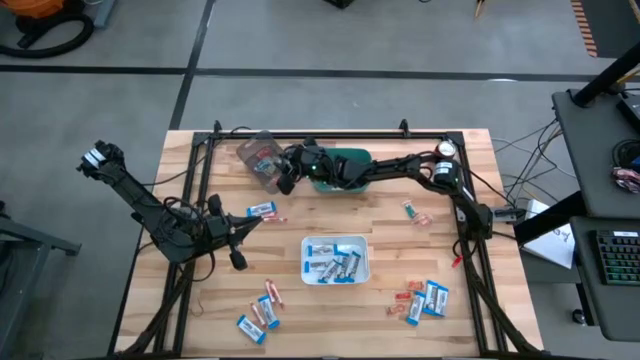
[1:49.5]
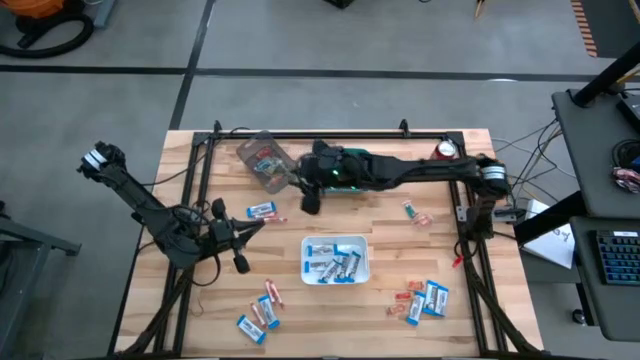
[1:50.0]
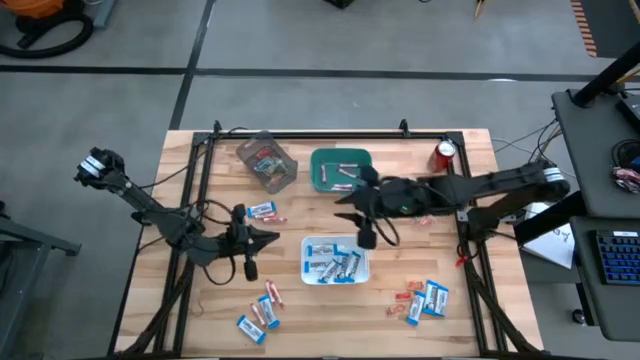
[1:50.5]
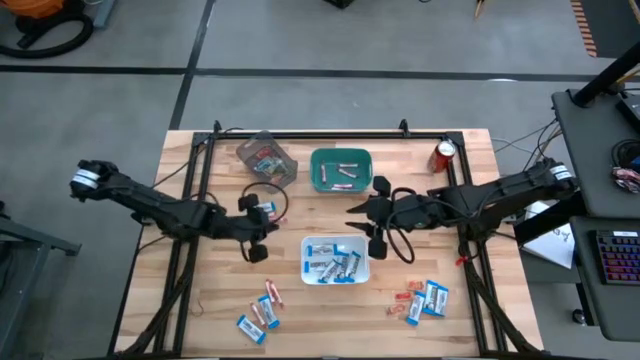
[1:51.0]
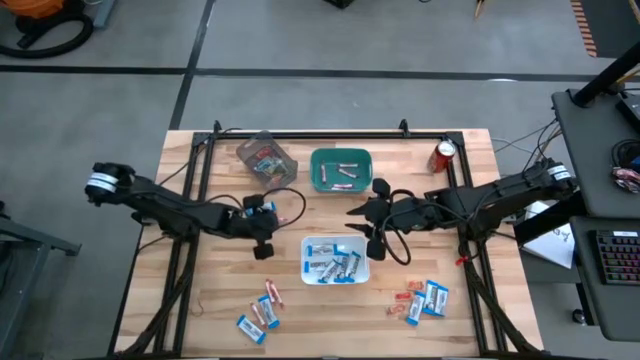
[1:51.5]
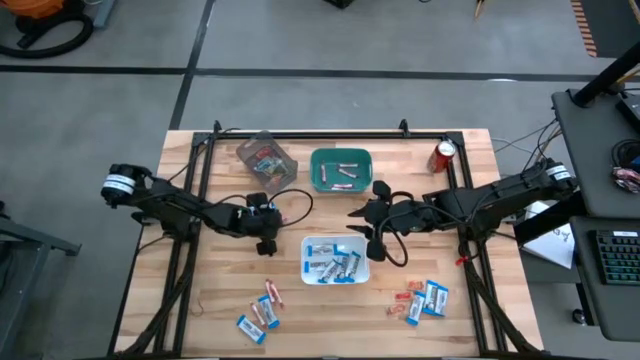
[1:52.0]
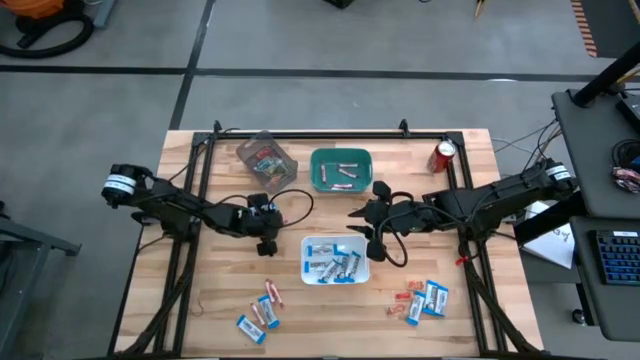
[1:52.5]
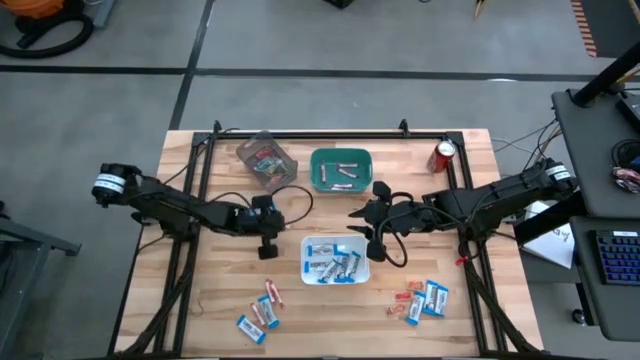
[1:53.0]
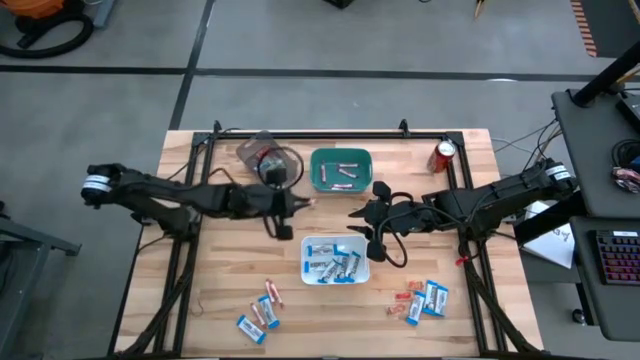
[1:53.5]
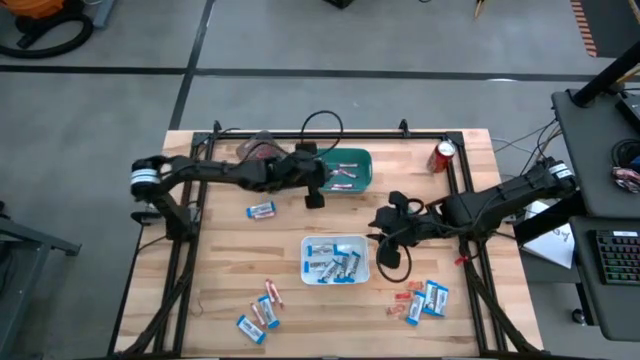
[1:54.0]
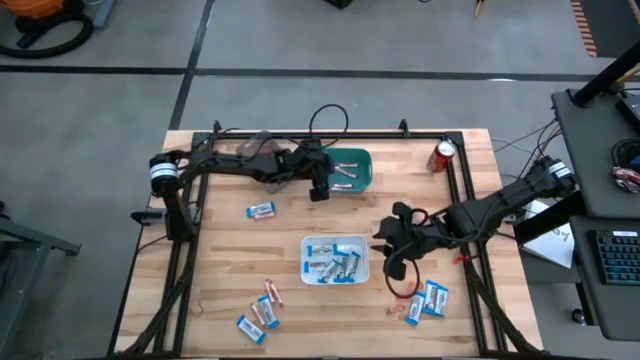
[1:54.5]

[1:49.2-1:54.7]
Task: Sort candy
Put the white candy into the green bin

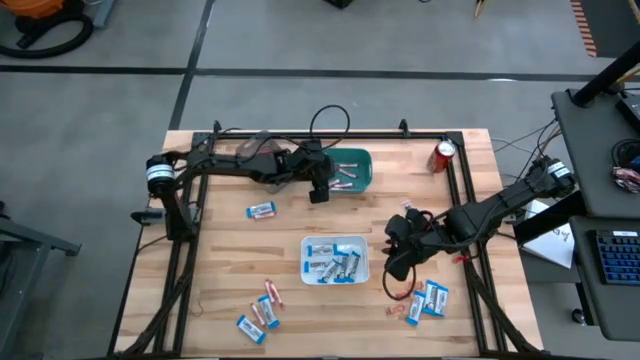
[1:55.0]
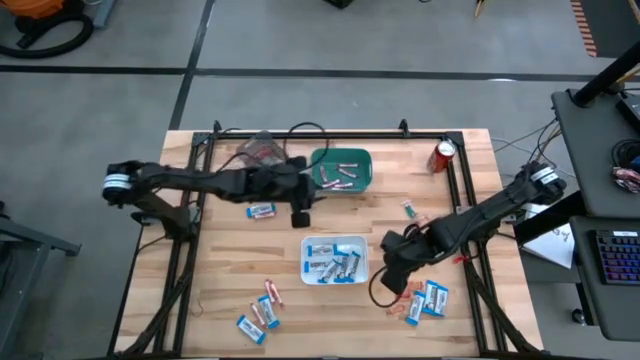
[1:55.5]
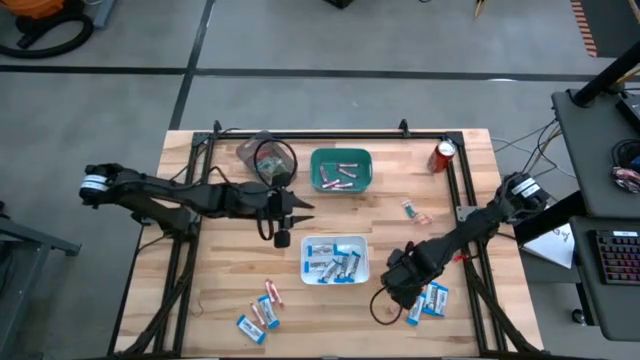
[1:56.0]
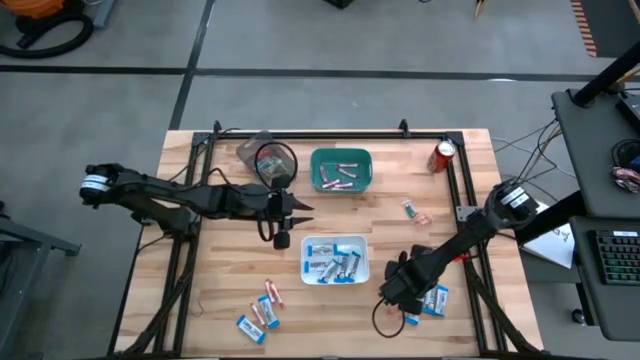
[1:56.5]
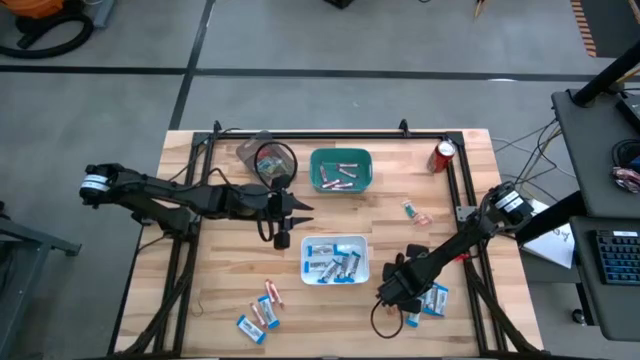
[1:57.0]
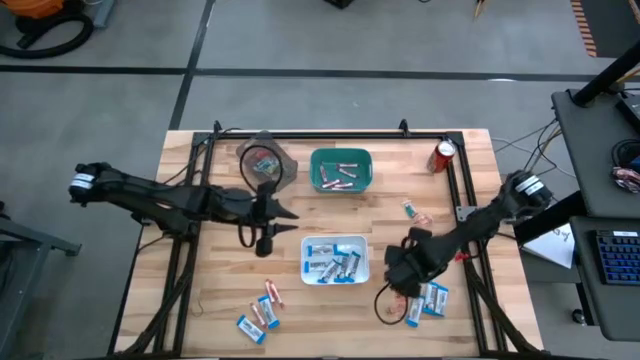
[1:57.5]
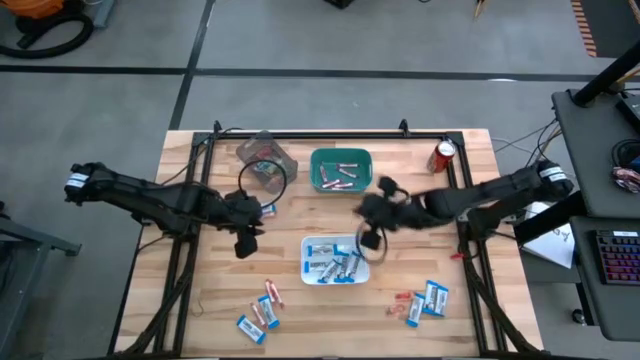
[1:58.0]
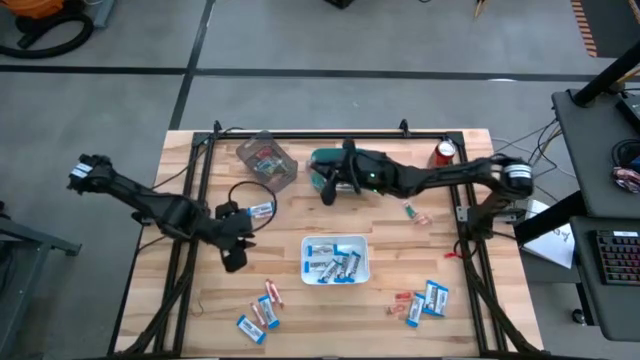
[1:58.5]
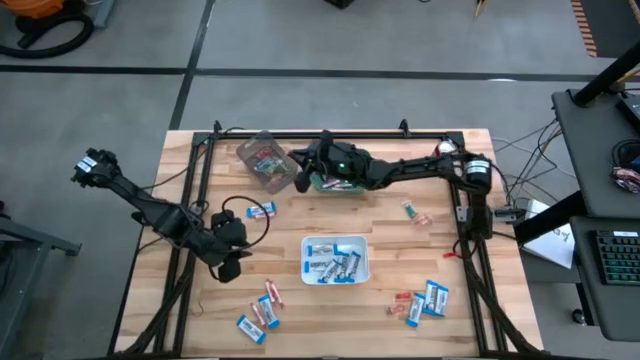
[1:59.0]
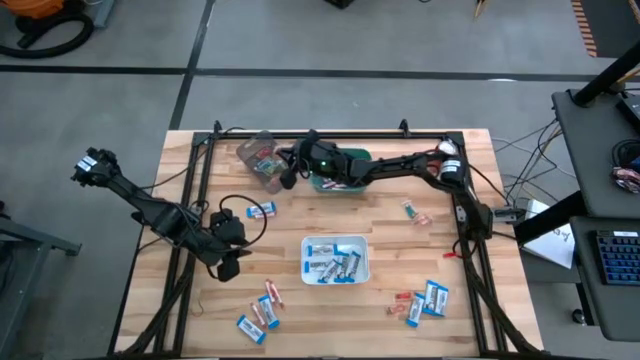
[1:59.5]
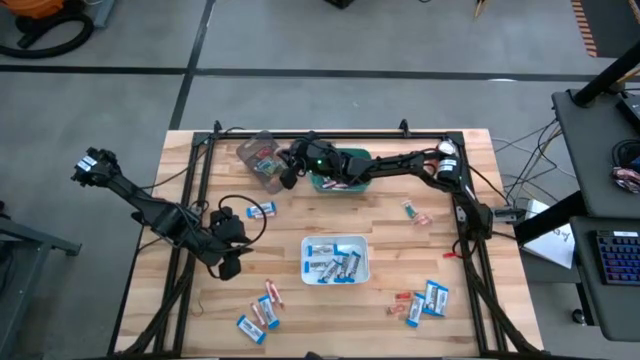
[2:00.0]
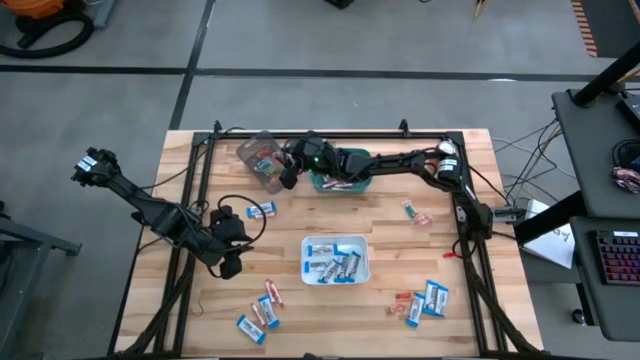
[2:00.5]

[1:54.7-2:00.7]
Put the orange gummy into the black bin

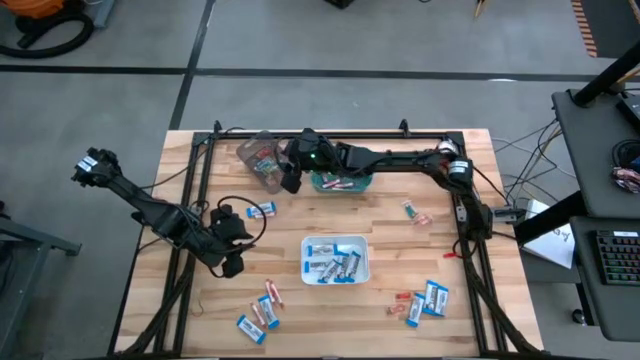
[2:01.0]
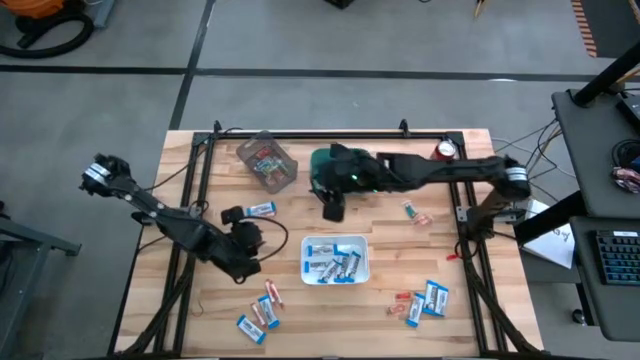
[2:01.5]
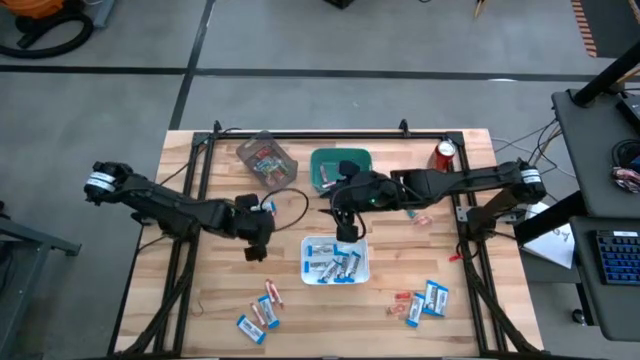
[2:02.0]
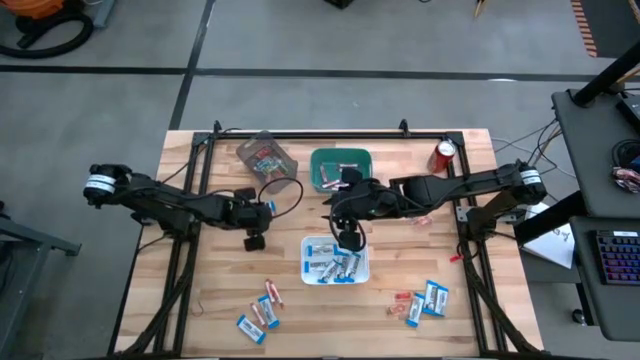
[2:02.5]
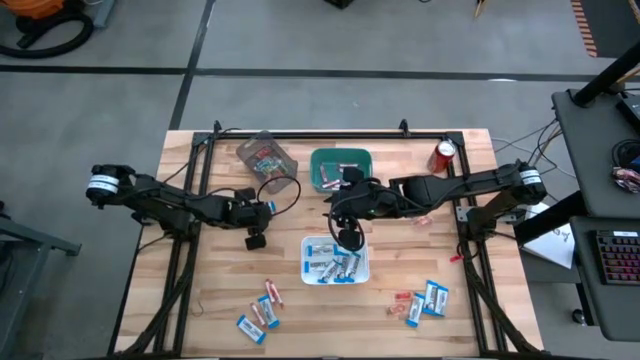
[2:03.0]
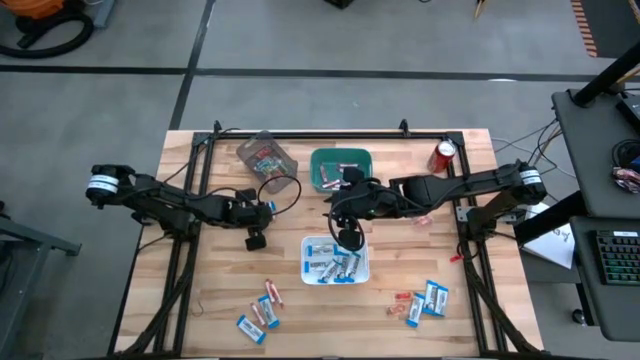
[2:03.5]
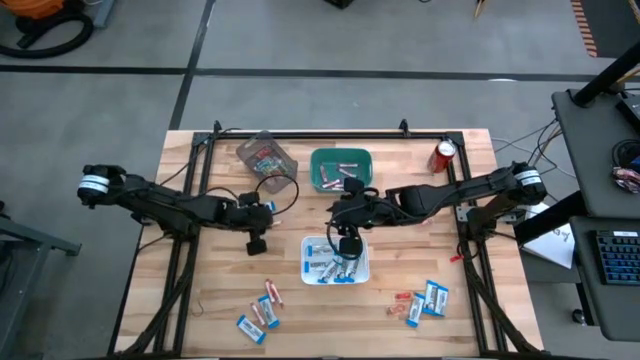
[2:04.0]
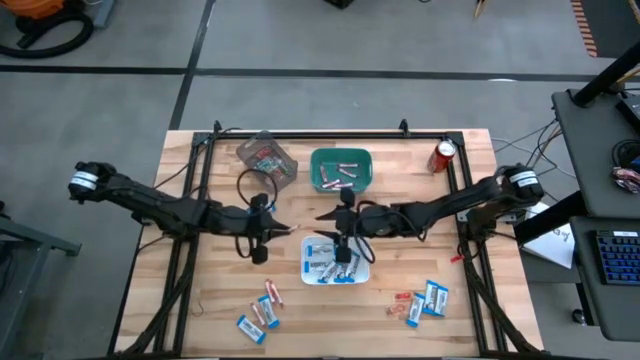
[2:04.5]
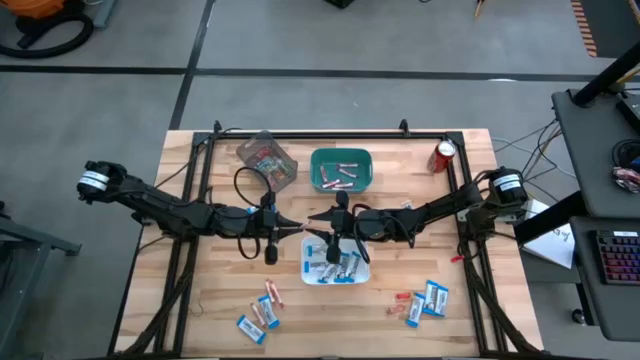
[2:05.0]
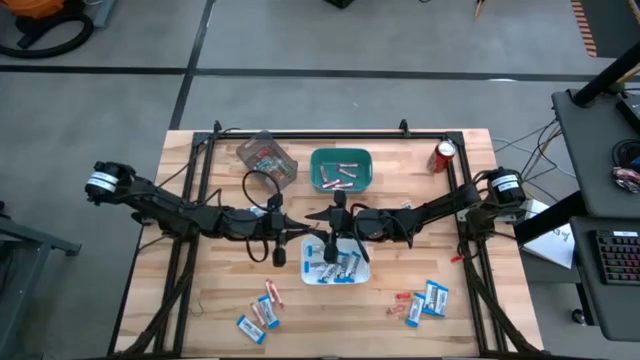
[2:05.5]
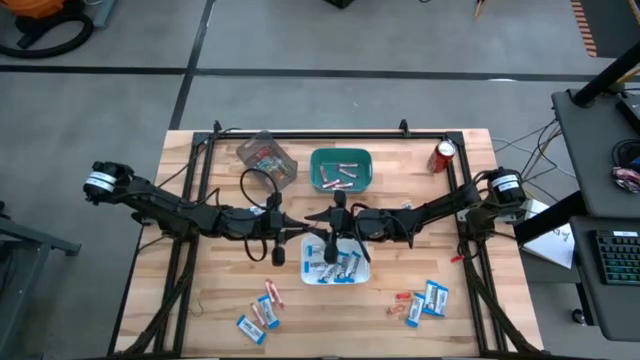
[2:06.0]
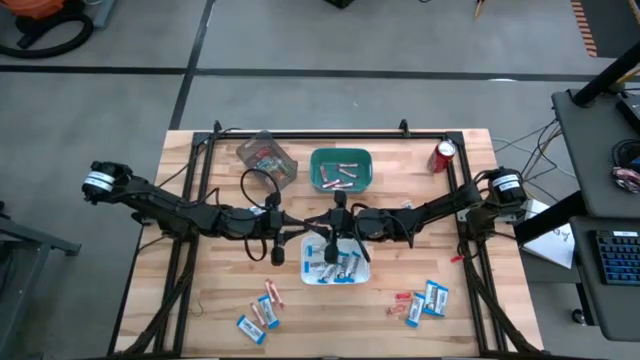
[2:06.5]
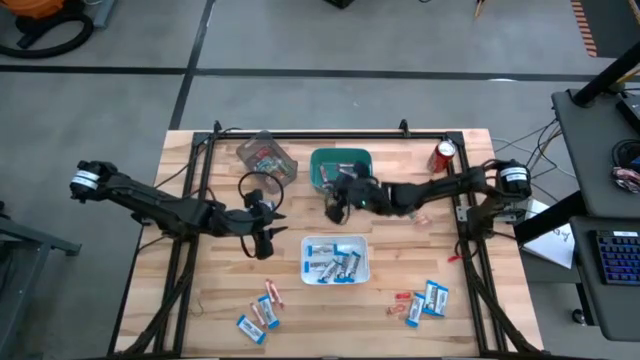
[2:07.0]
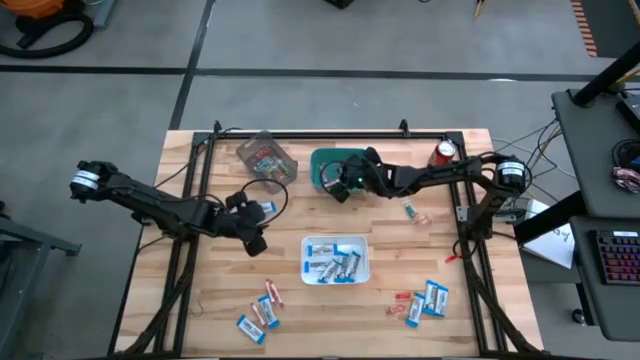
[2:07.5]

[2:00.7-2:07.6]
Put the white candy into the green bin

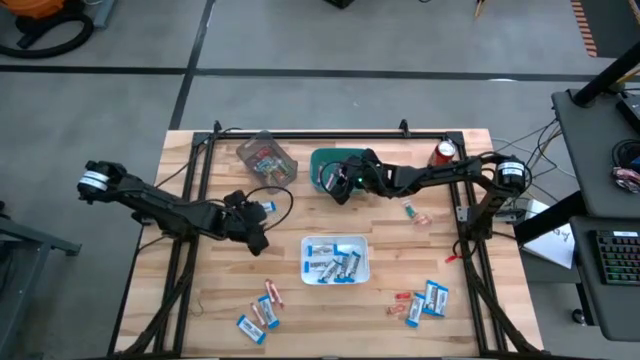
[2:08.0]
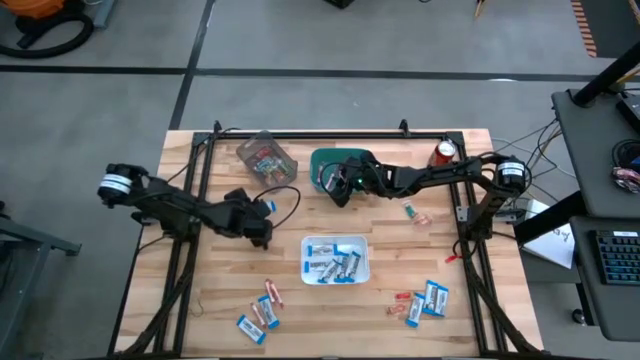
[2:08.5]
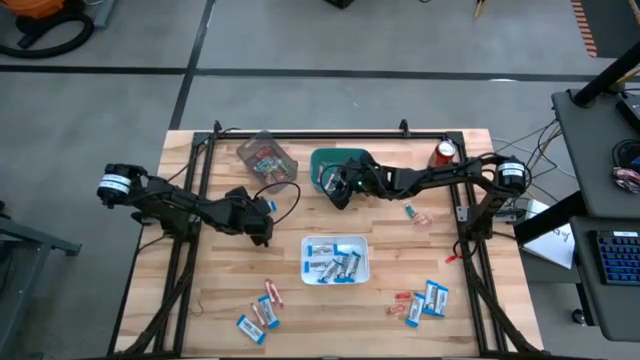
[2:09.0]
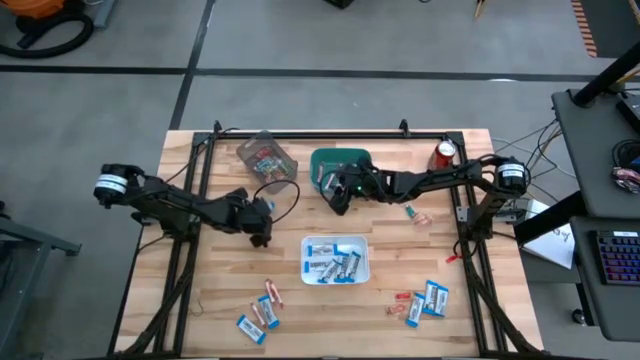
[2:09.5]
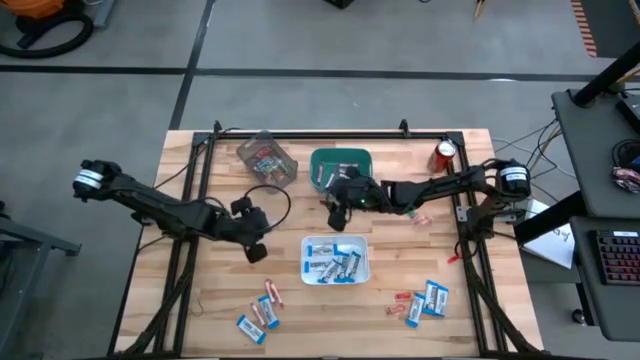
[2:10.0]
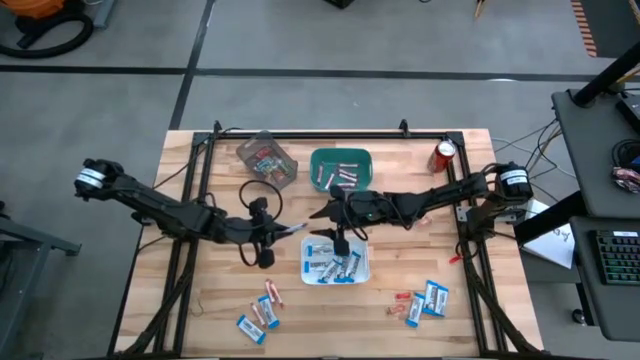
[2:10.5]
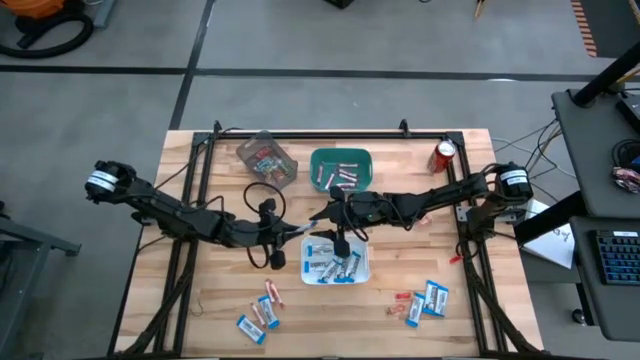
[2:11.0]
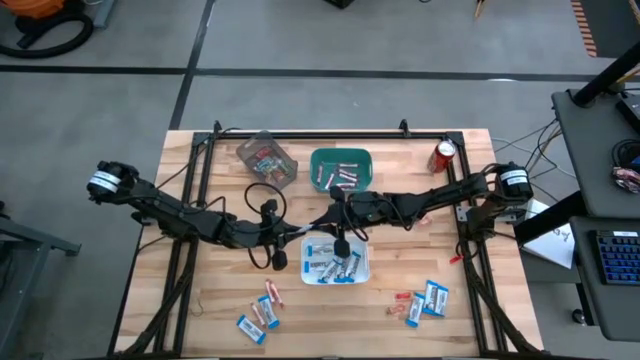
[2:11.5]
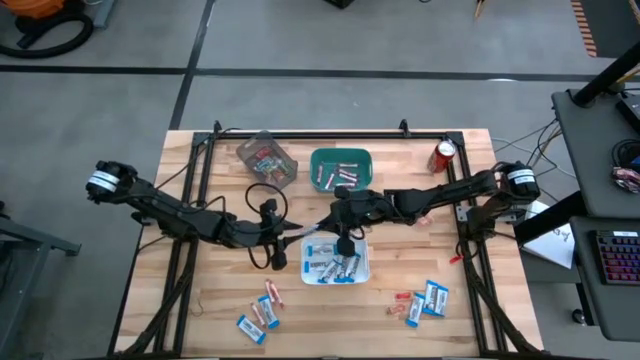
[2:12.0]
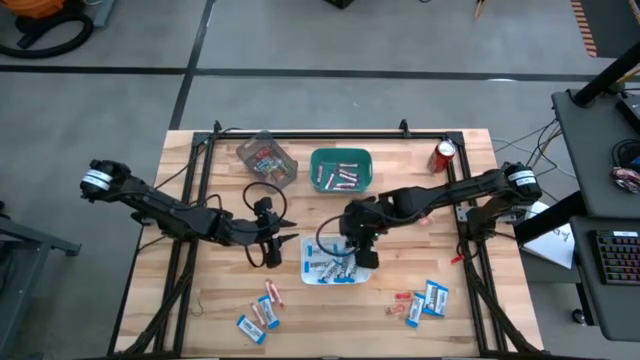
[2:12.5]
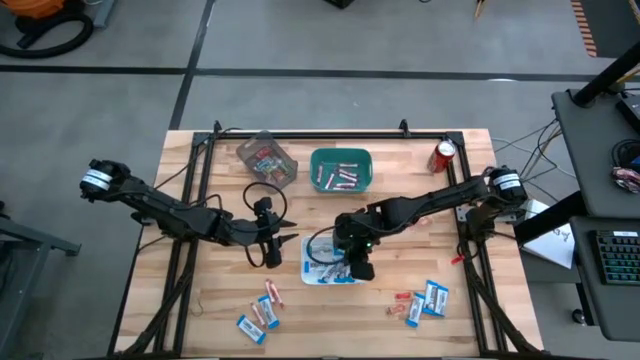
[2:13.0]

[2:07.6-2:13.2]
Put the white chocolate bar into the white bin
